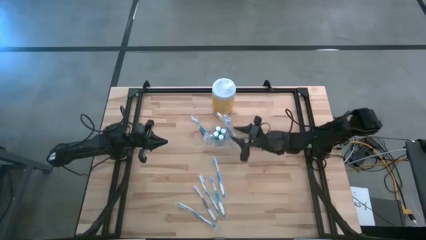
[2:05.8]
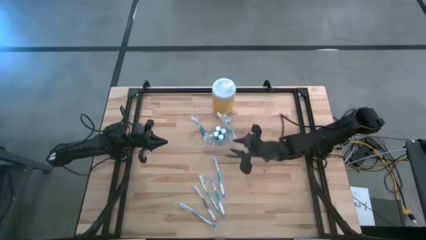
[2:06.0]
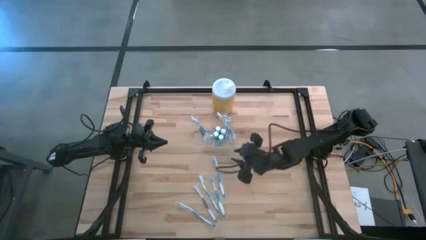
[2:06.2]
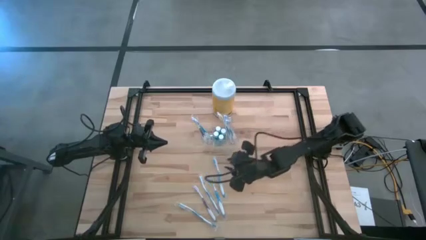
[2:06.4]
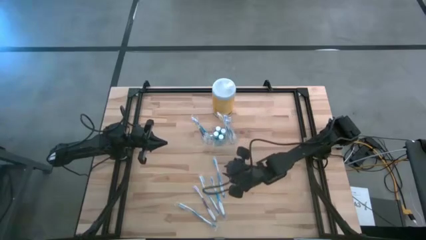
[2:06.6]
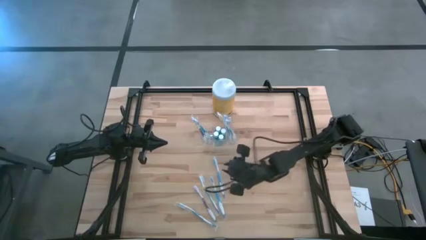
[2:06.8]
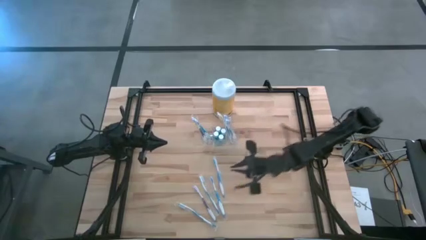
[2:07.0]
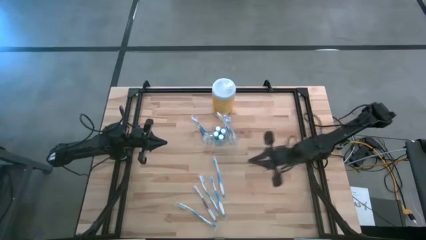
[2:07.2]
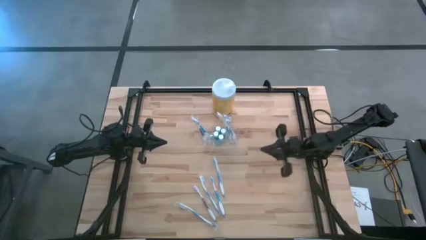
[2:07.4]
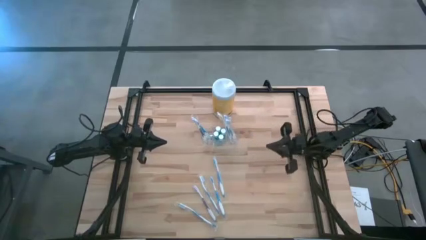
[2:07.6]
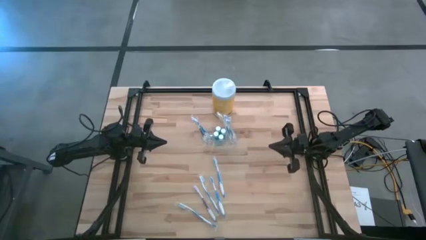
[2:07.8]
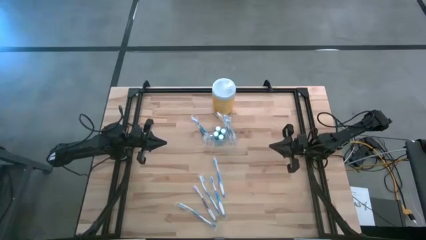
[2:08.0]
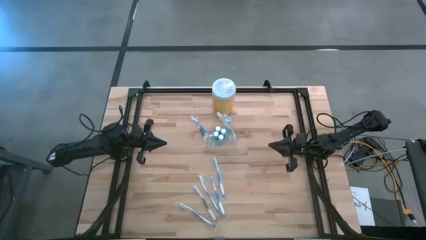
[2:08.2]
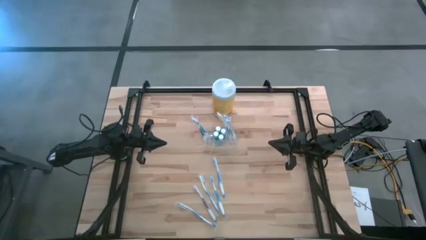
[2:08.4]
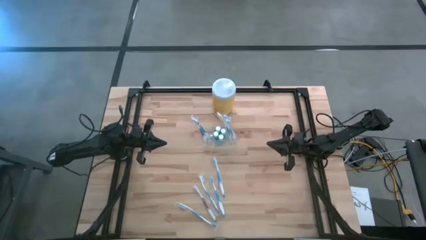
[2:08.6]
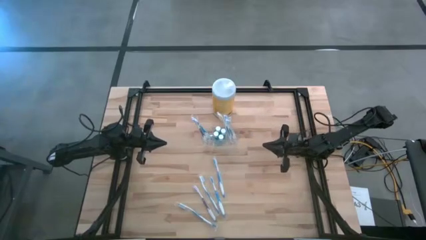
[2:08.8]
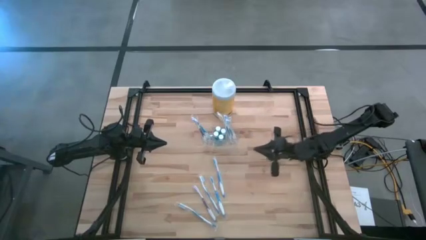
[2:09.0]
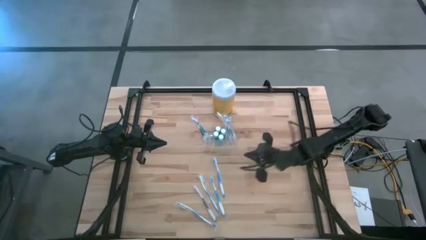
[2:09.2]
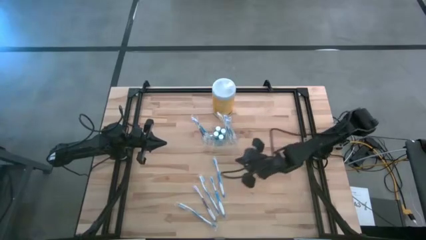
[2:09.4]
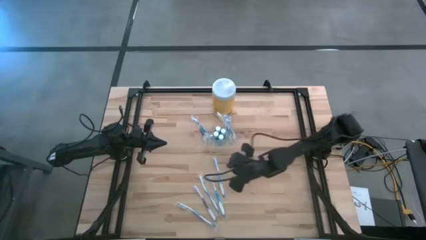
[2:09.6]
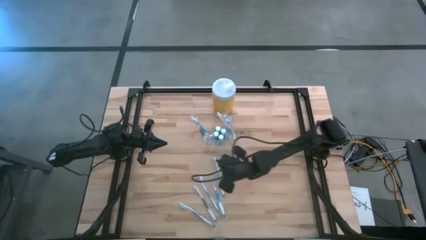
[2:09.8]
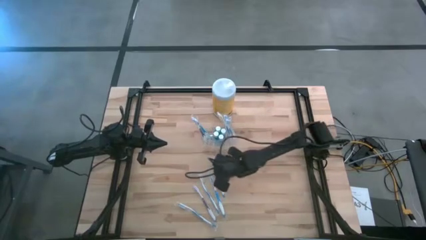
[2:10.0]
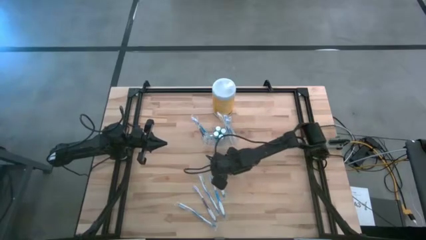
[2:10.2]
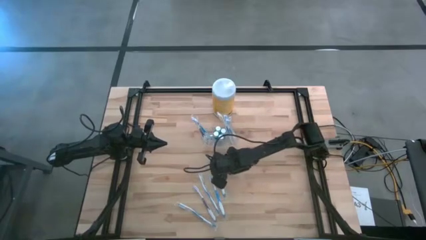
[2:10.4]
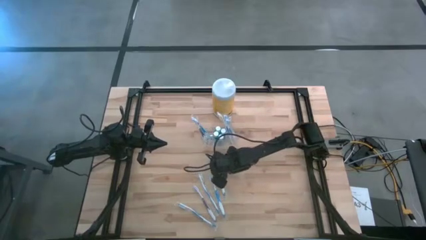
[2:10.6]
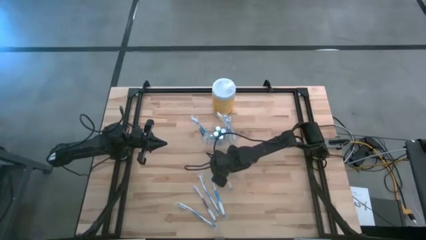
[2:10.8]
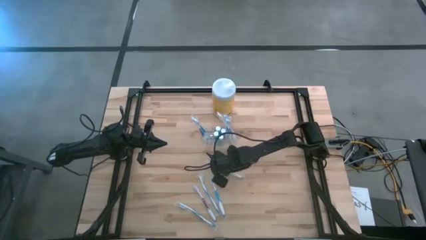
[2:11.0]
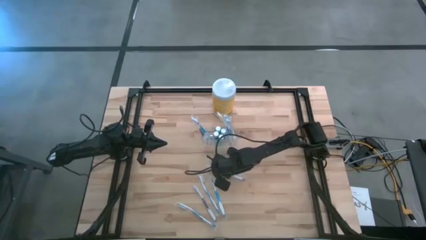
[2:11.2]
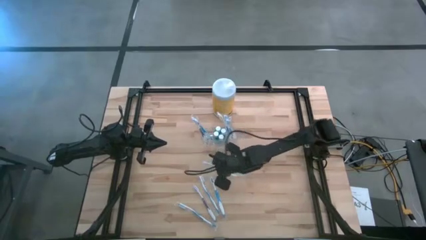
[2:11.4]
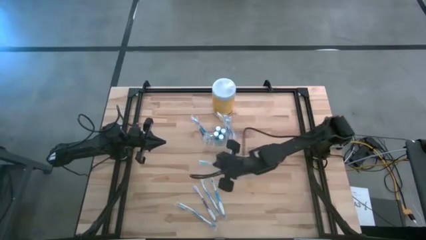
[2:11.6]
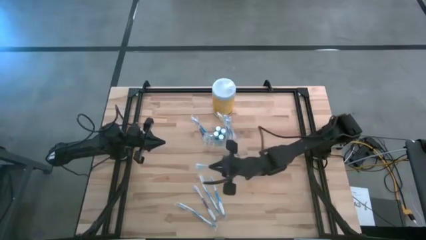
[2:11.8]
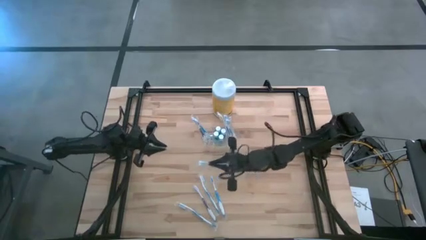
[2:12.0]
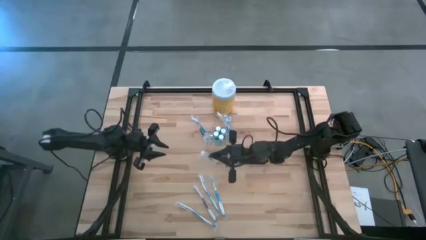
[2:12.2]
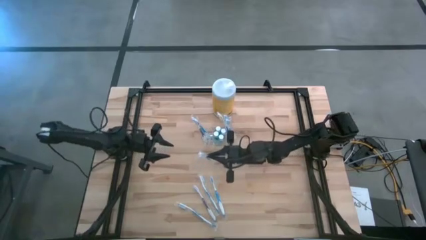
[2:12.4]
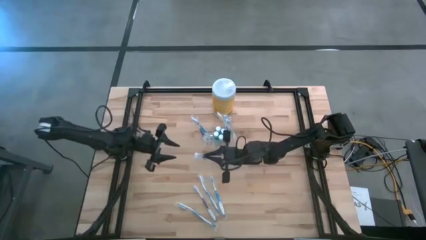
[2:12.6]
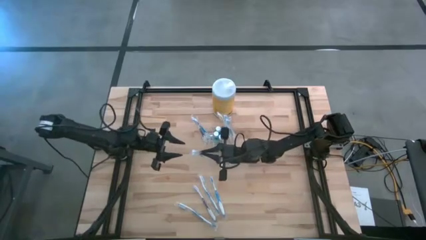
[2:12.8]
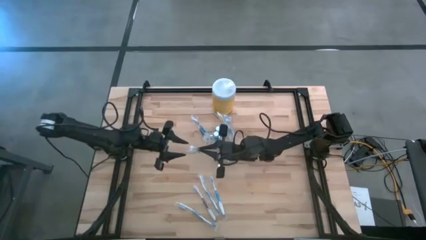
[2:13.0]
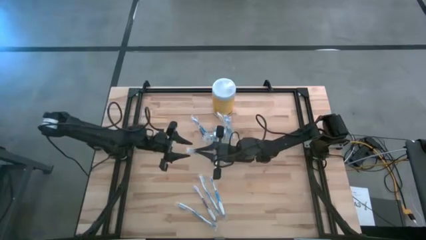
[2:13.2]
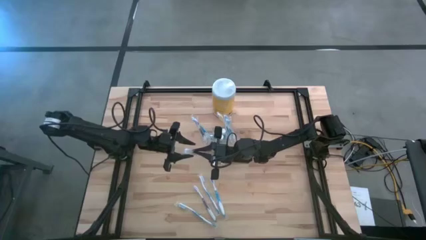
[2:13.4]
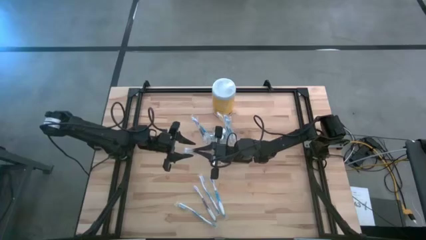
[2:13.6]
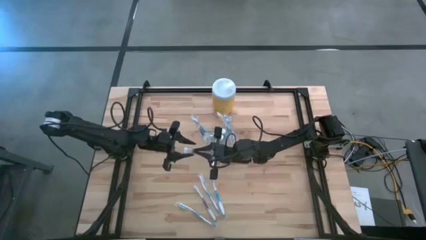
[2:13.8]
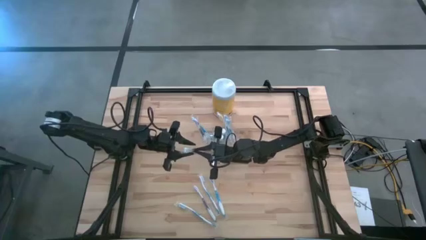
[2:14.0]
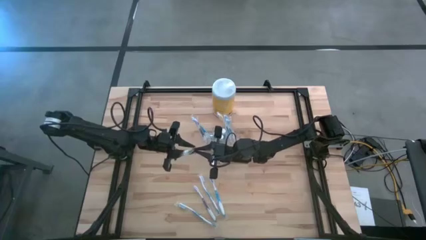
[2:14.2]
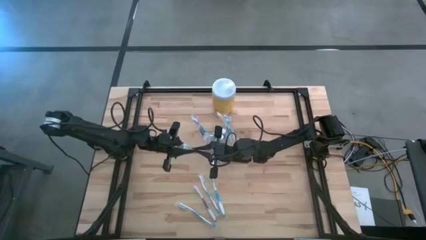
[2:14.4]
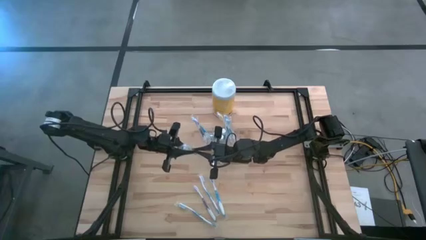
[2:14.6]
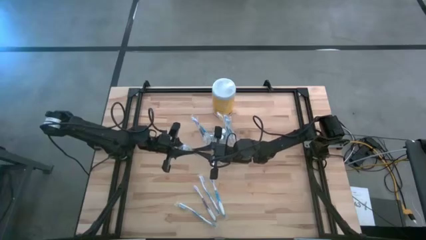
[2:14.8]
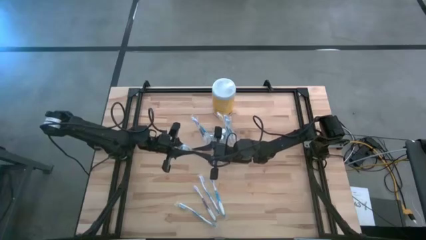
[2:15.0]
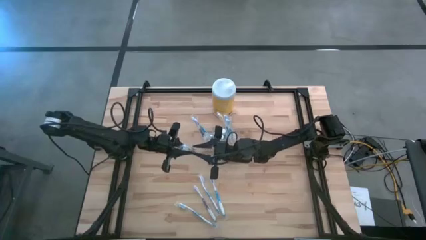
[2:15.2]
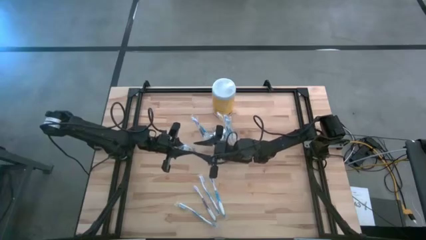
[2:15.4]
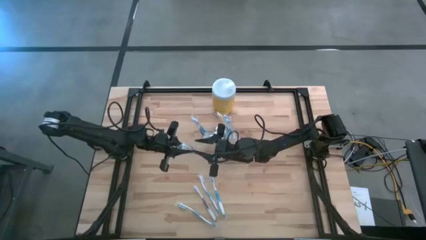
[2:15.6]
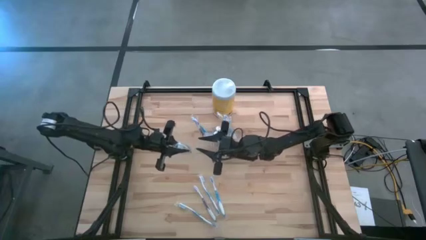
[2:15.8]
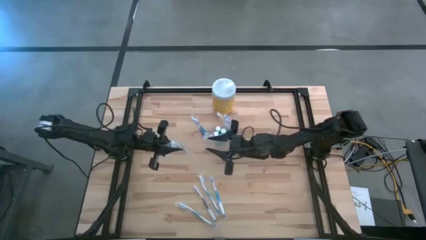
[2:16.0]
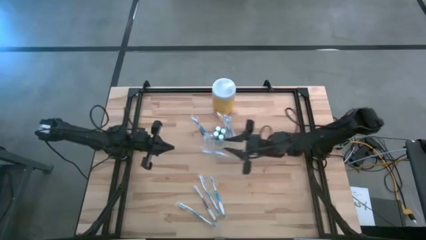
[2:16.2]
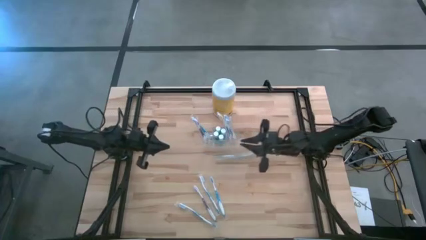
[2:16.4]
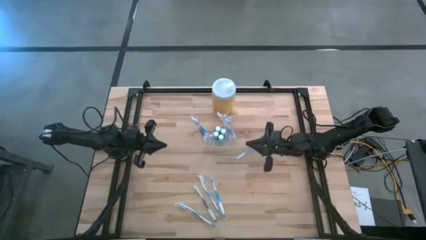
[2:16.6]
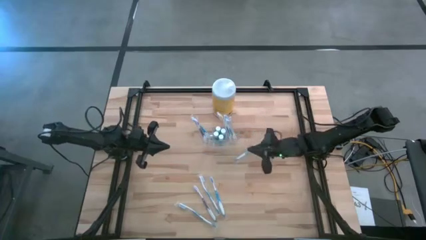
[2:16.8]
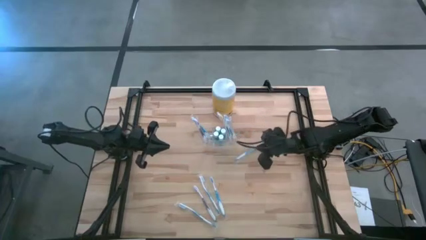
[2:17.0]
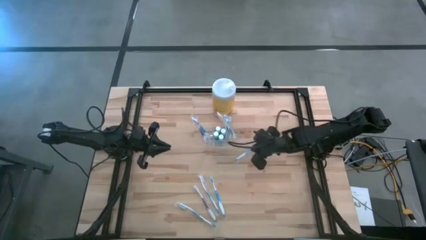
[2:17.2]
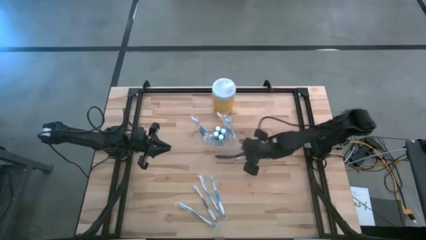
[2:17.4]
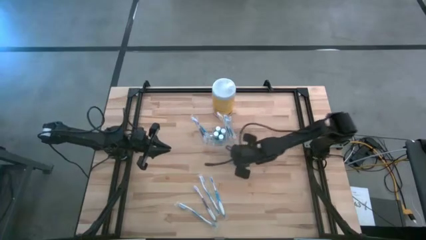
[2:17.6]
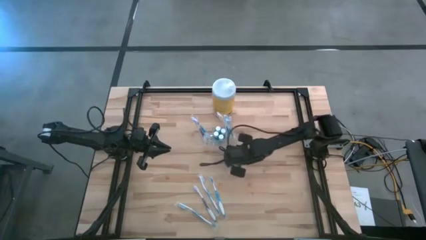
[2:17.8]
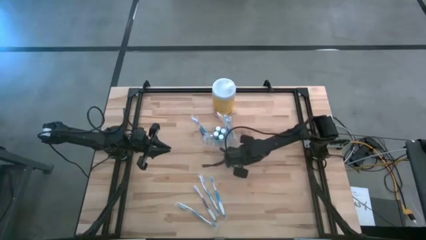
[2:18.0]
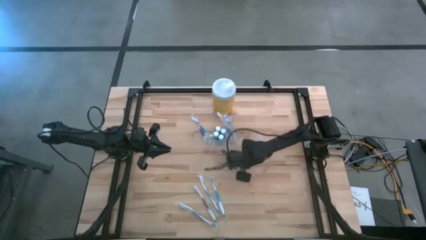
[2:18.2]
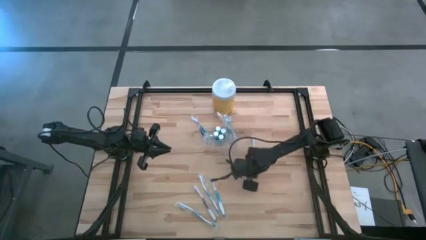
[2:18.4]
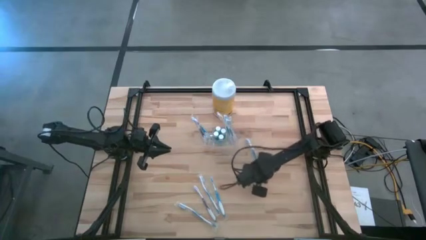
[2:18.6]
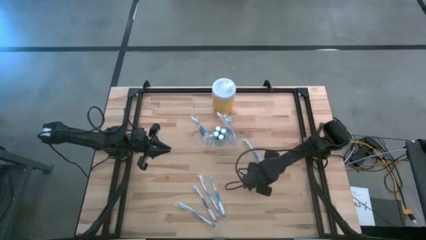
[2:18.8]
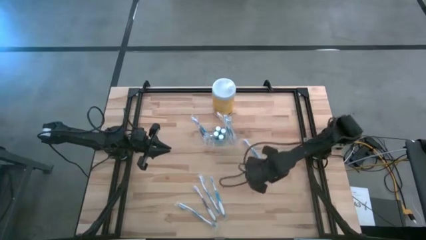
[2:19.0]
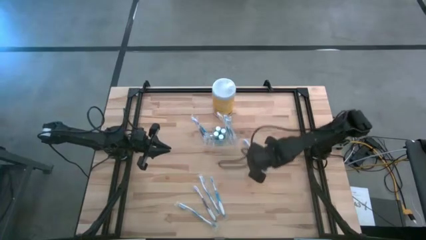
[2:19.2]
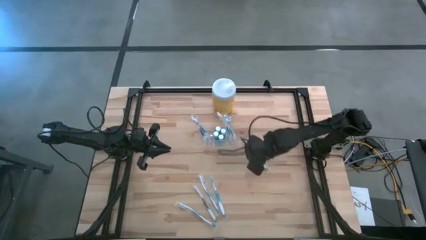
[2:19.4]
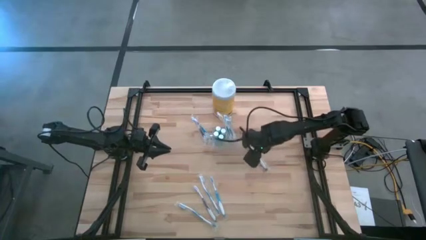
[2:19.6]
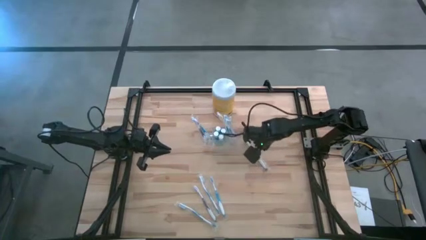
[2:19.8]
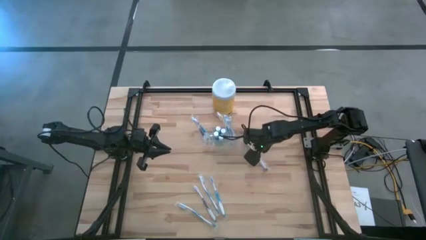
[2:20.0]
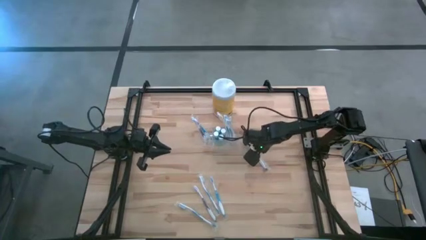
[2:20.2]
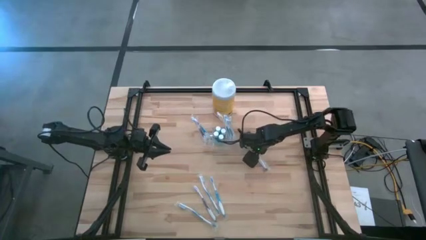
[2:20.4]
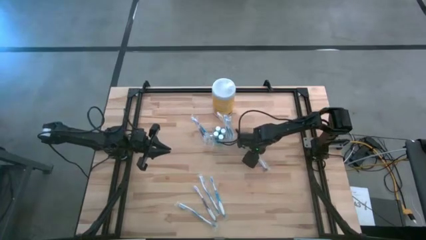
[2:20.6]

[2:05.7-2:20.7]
Task: Pick & Place toothbrushing station
Put the blue toothbrush into the transparent organizer
